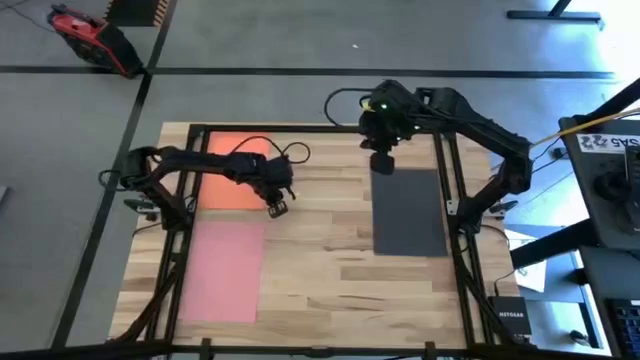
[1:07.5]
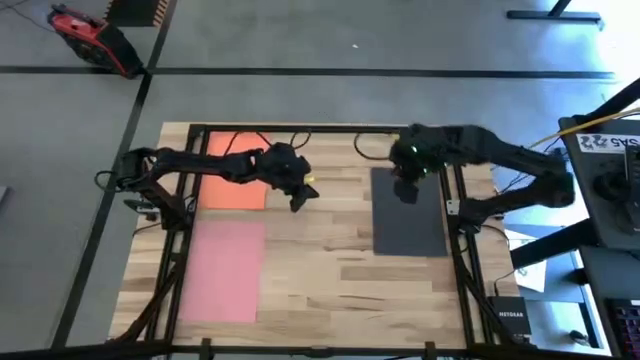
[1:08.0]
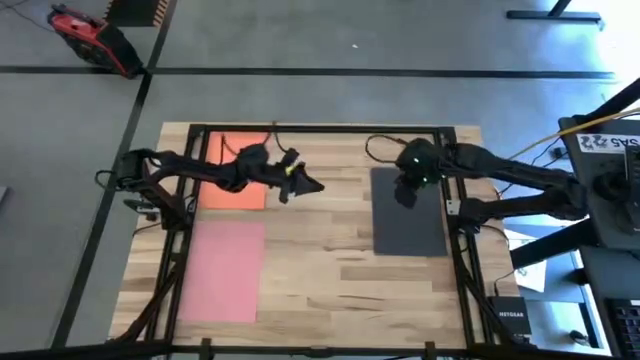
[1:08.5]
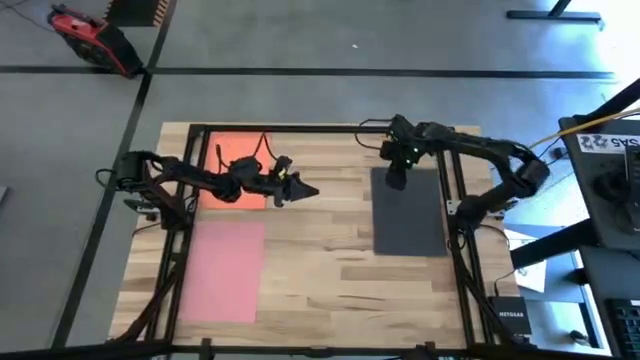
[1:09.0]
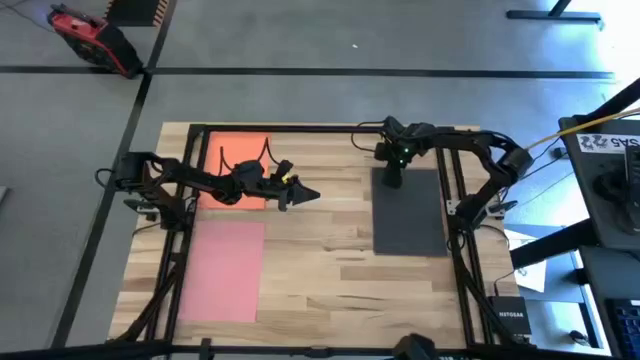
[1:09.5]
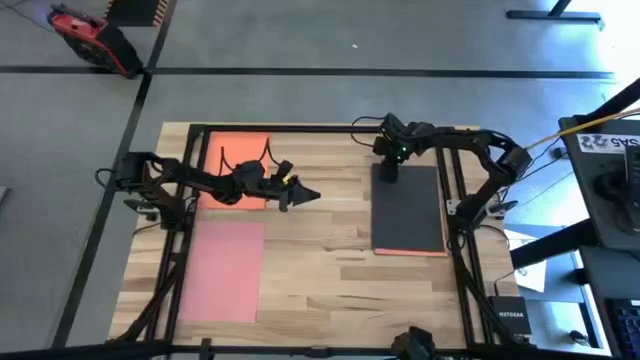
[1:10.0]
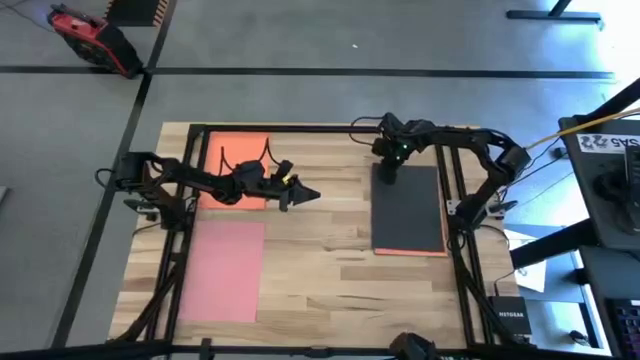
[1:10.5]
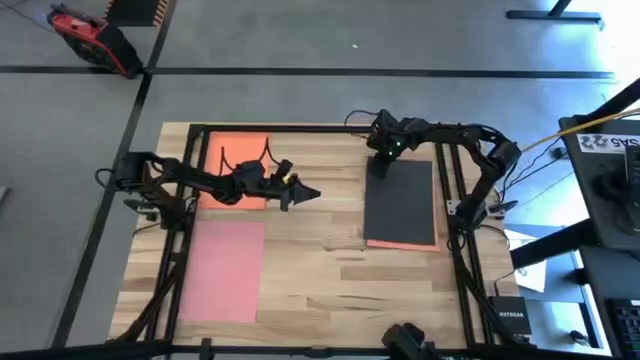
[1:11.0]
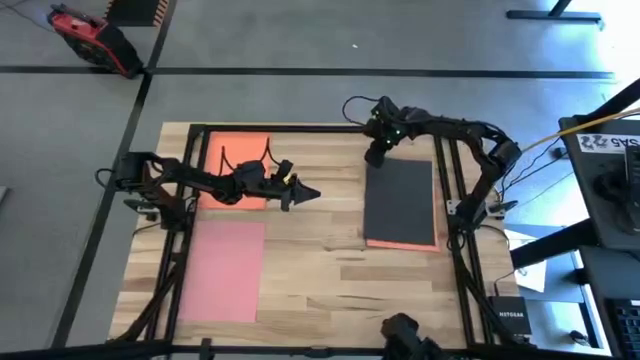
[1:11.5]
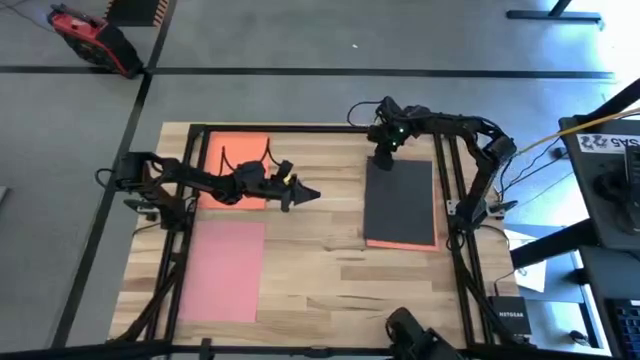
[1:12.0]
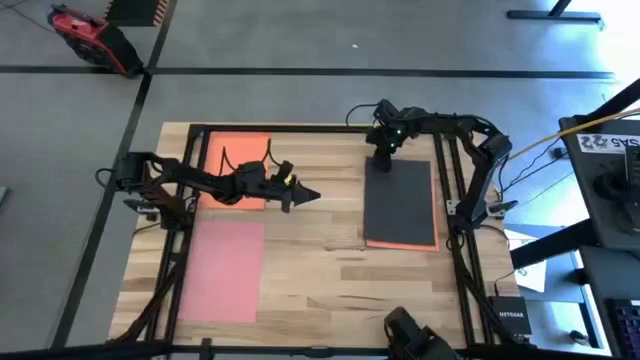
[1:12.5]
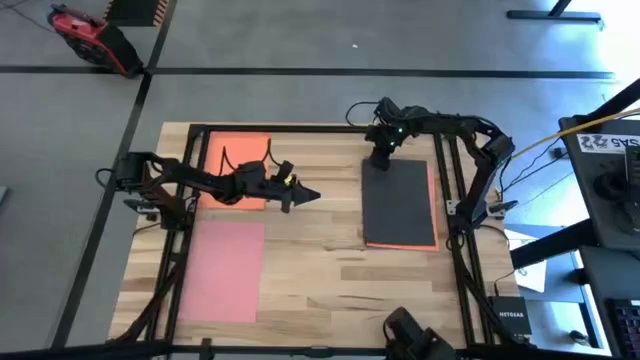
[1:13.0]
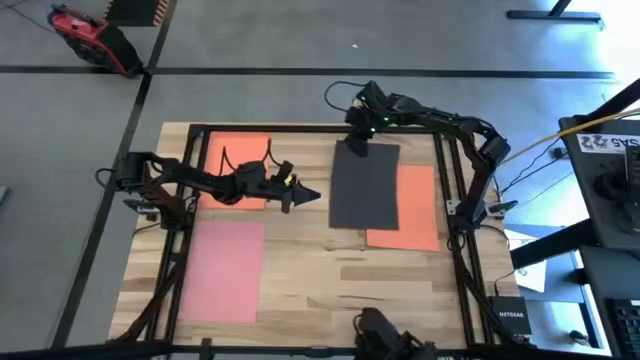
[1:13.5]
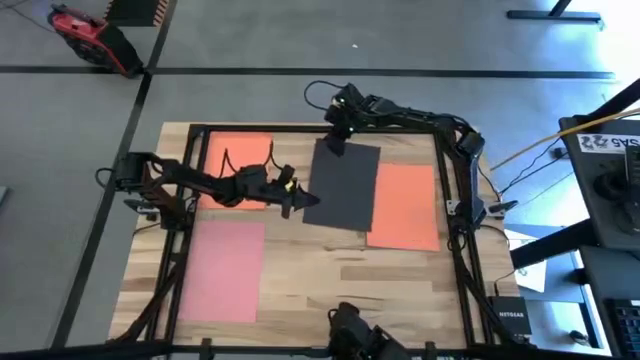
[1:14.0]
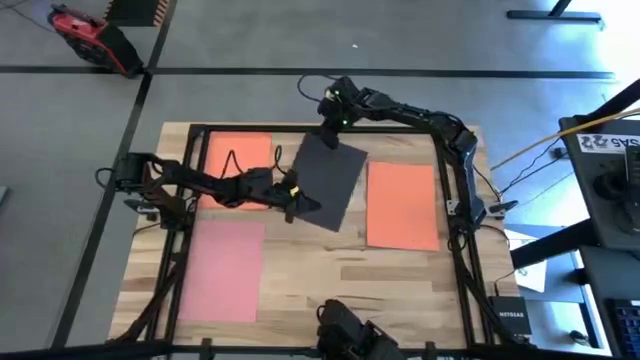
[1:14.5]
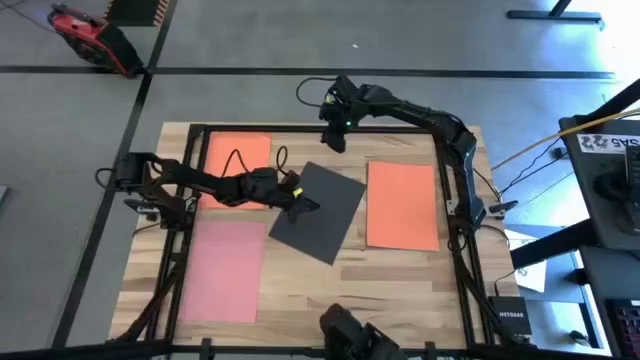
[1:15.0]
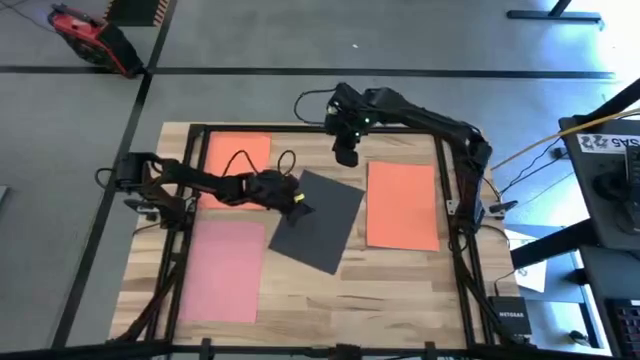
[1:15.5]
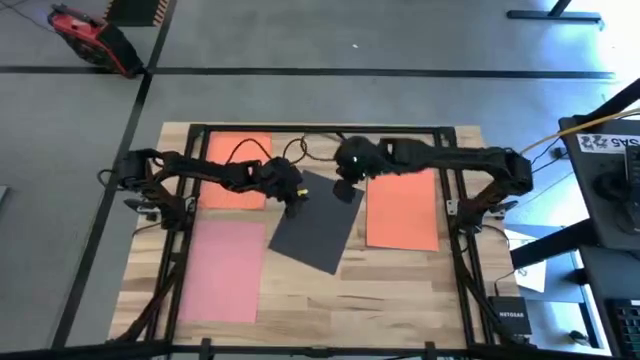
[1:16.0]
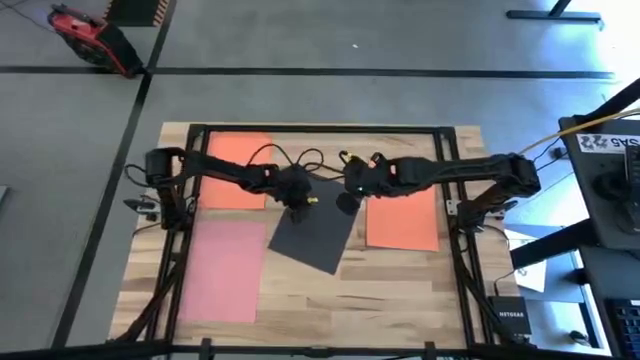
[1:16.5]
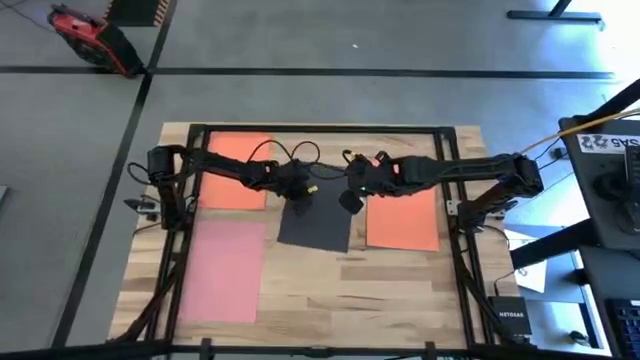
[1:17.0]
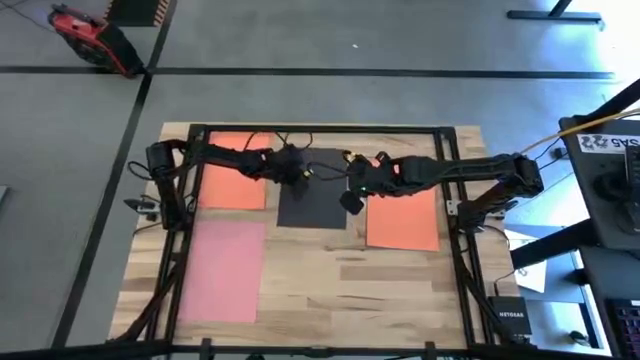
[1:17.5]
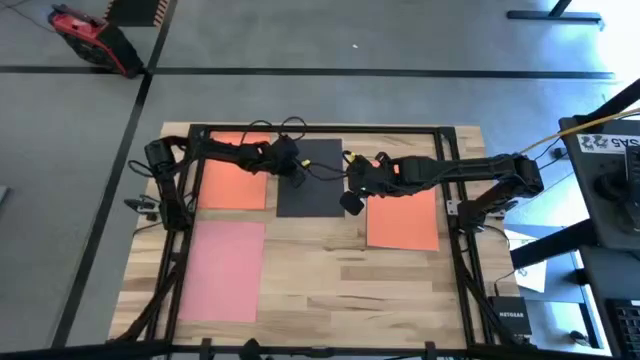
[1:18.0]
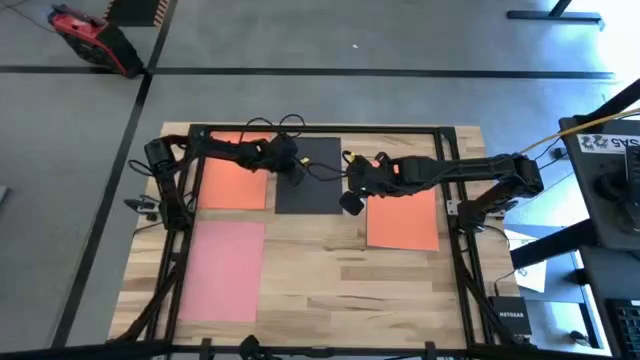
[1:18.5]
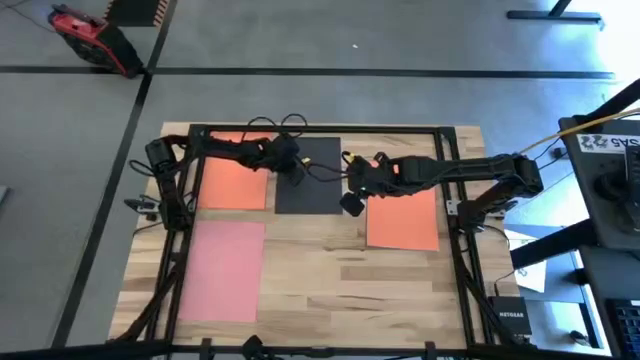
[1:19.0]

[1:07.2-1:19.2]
Task: Organize paper
Move the black color paper to the top center of the table

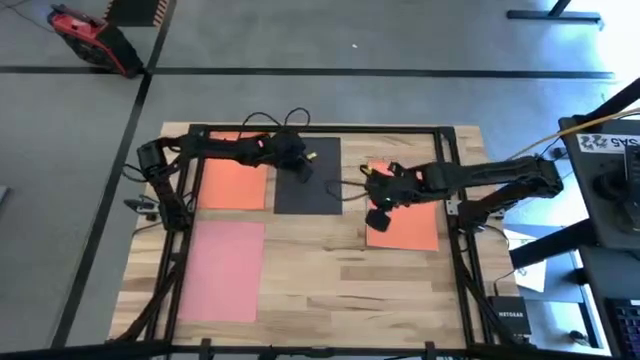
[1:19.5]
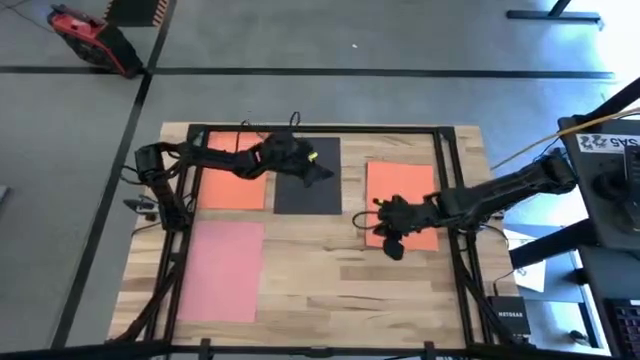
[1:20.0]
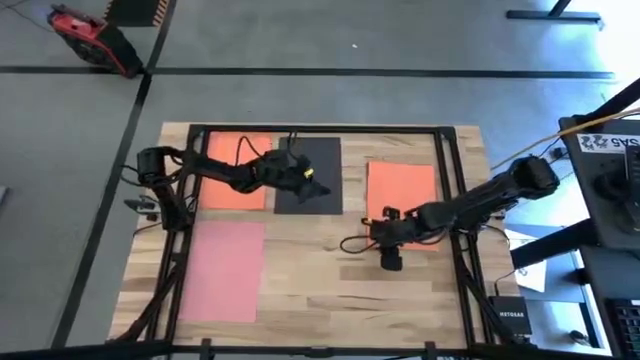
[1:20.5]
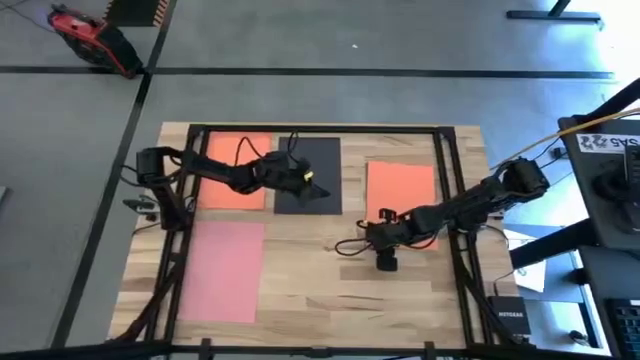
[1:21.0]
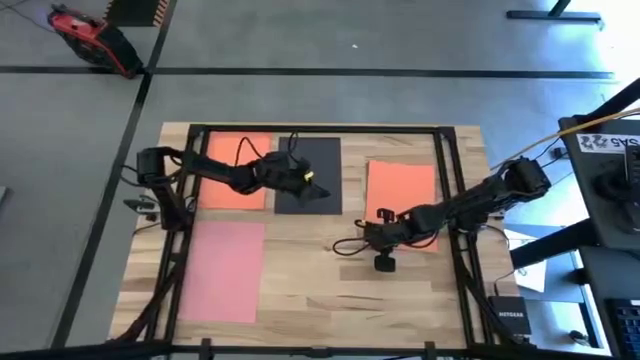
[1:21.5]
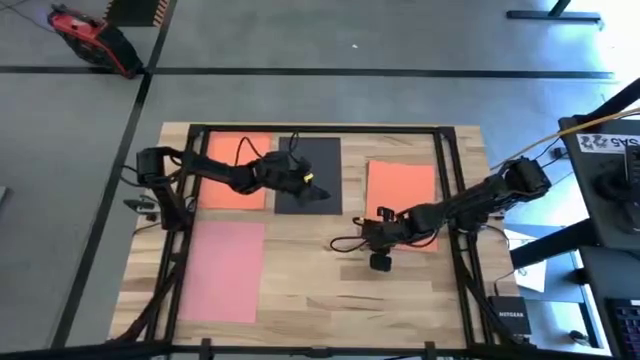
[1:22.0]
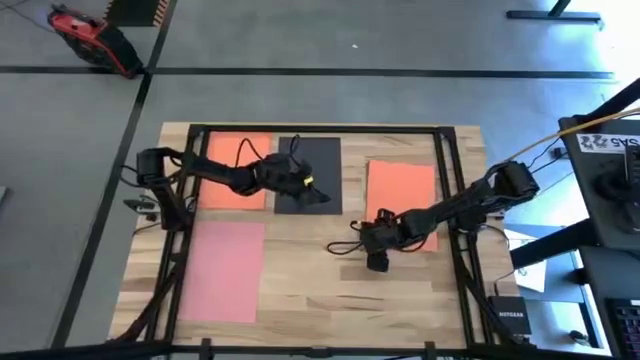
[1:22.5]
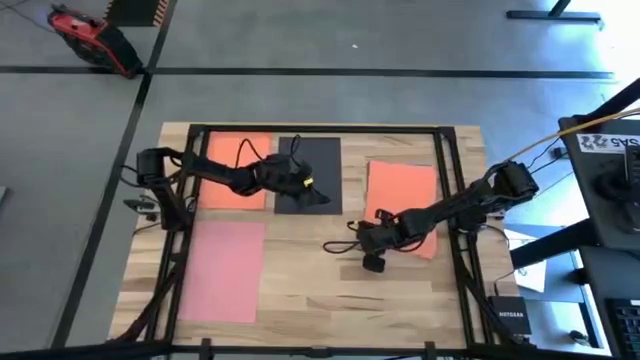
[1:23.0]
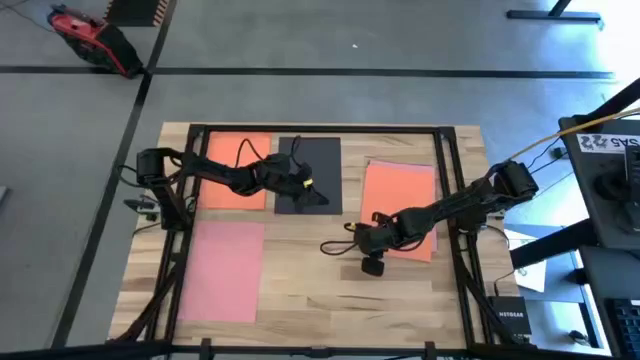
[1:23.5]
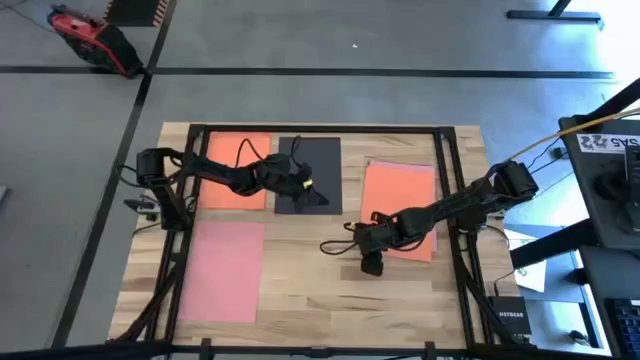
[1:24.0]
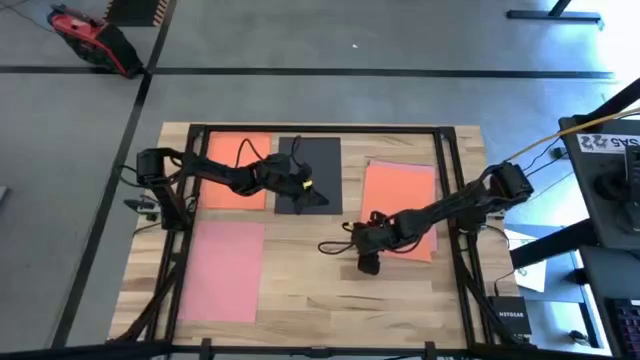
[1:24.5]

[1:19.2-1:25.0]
Stack the orange color paper on top of the other orange color paper

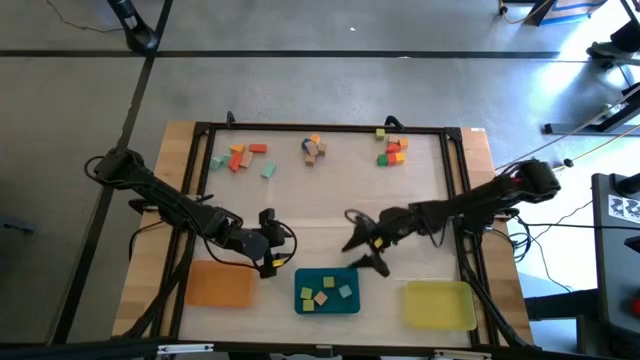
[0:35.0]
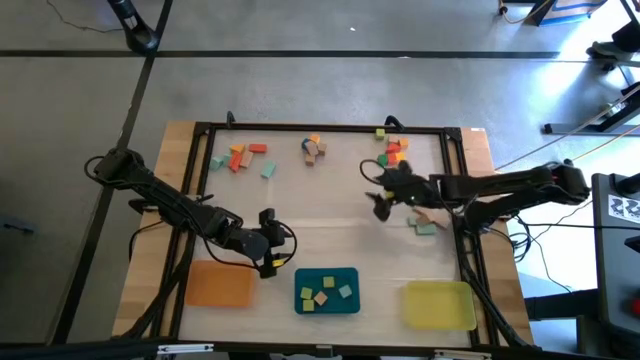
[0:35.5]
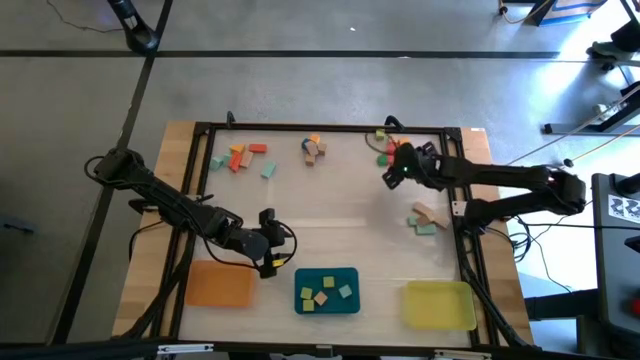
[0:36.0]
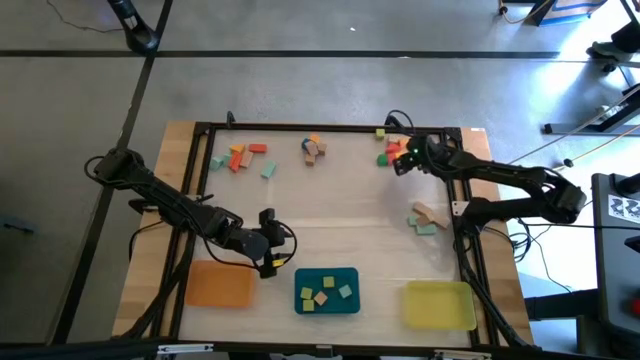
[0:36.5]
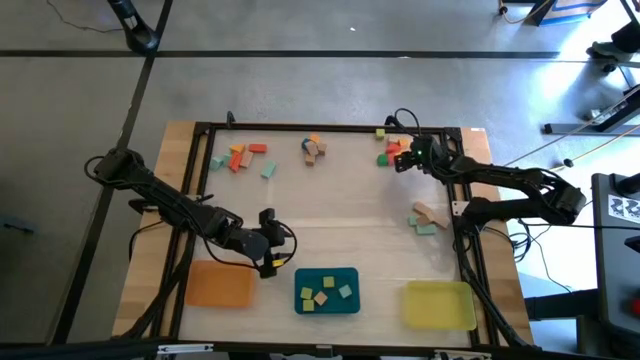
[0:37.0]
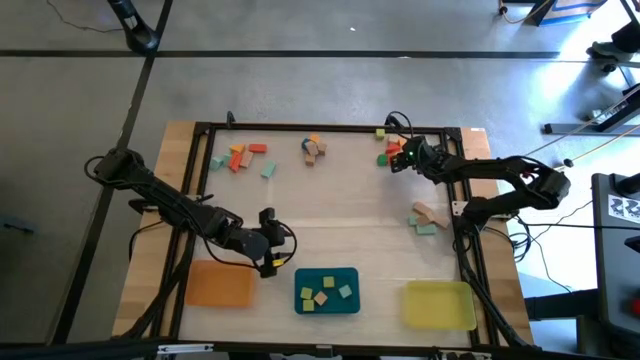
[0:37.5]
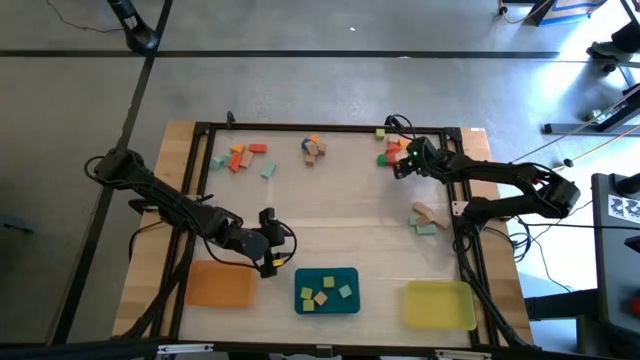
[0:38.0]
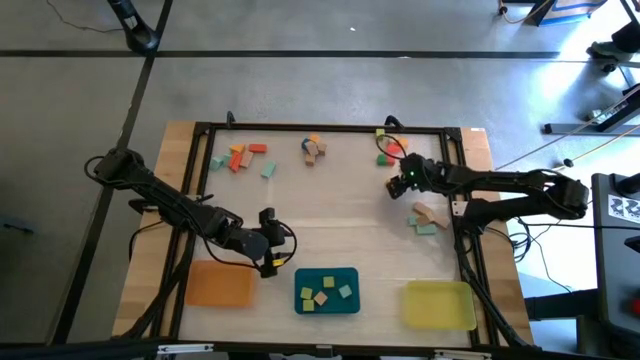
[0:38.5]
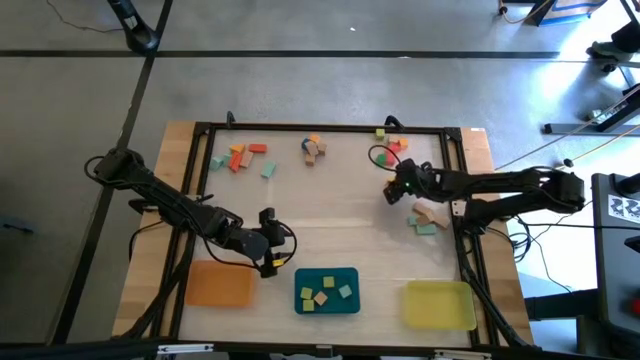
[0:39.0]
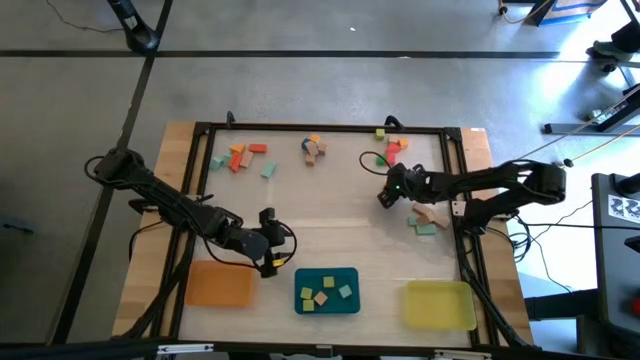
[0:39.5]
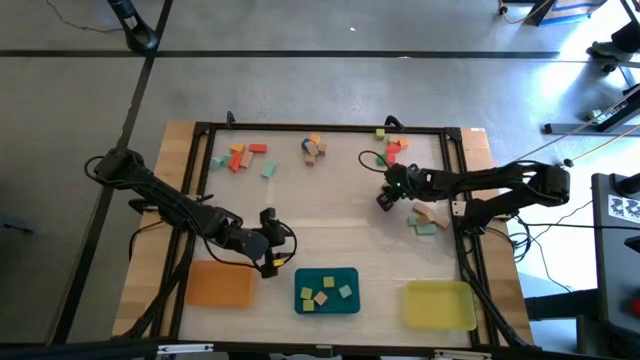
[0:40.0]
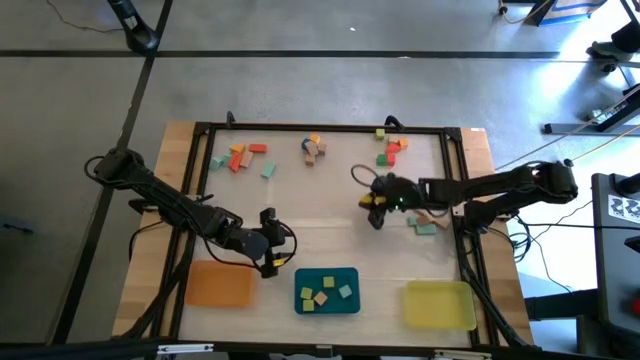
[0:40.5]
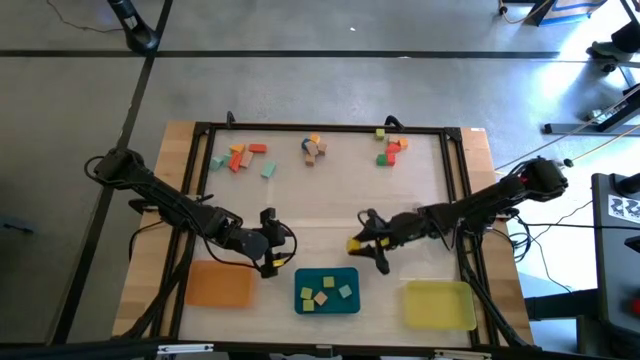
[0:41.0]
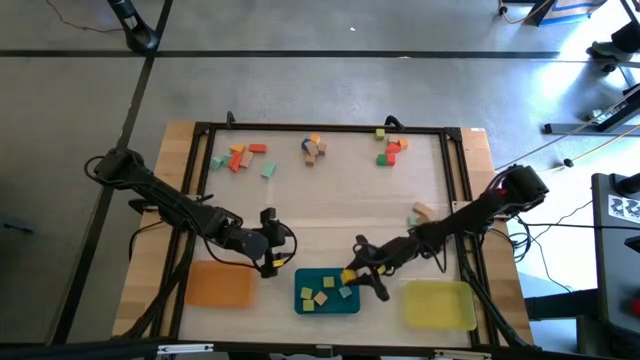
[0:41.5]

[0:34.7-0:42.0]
Task: Sort blocks by size
Put the yellow cube block into the blue bin
